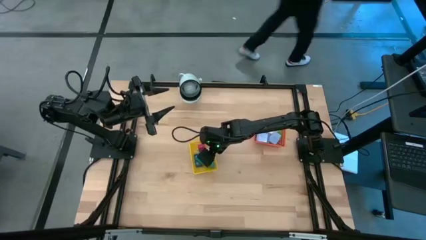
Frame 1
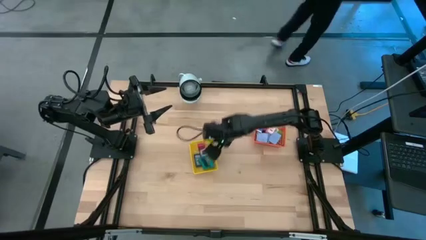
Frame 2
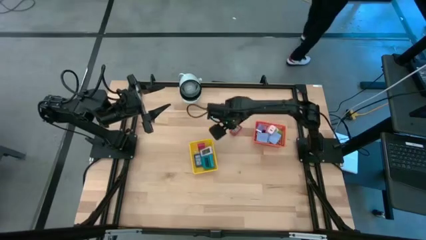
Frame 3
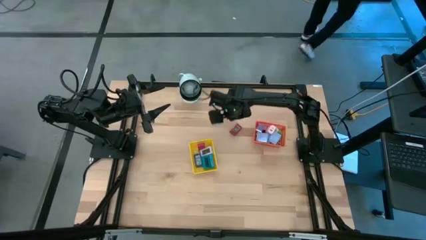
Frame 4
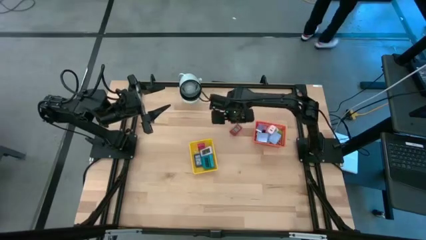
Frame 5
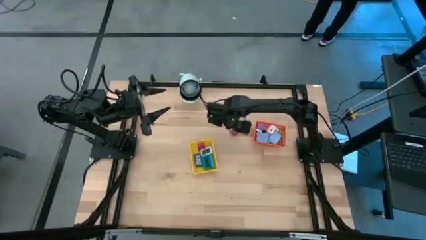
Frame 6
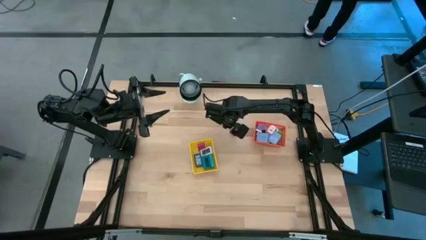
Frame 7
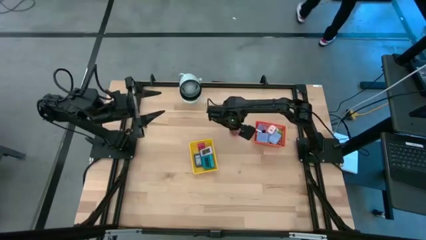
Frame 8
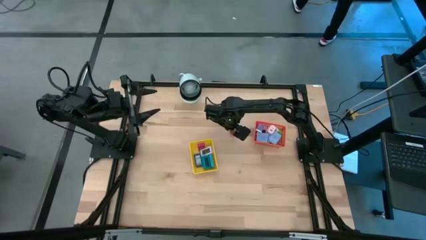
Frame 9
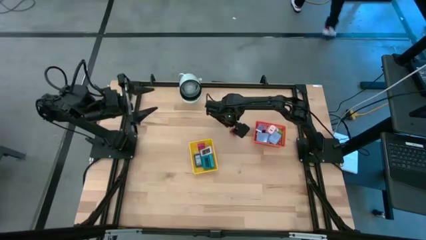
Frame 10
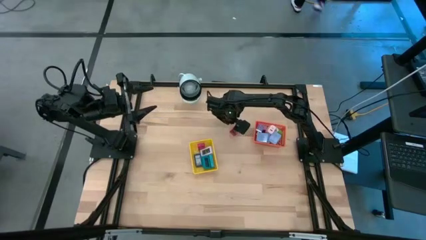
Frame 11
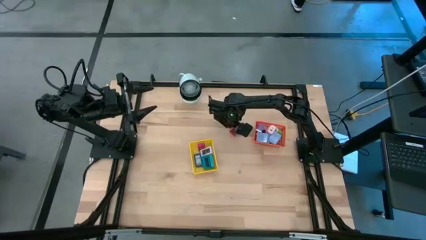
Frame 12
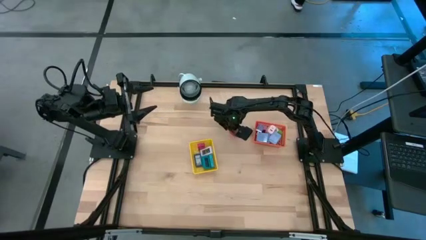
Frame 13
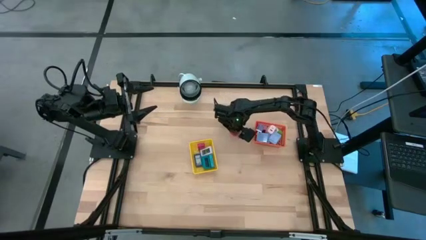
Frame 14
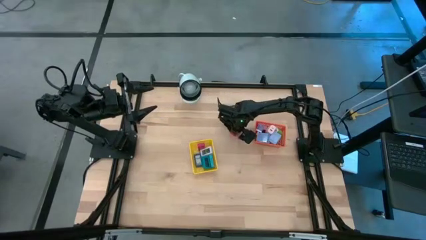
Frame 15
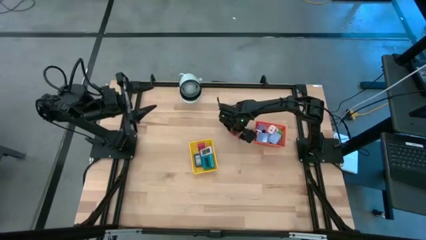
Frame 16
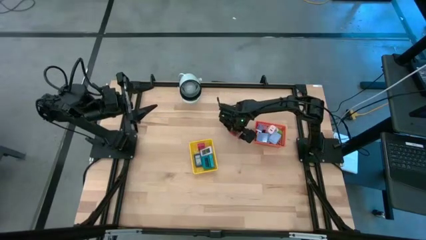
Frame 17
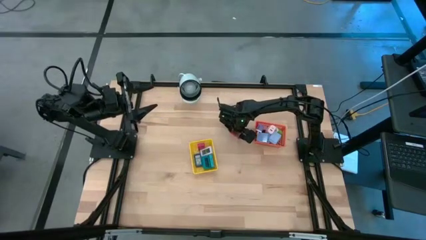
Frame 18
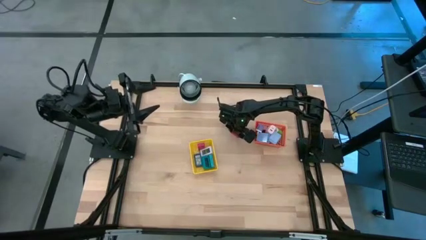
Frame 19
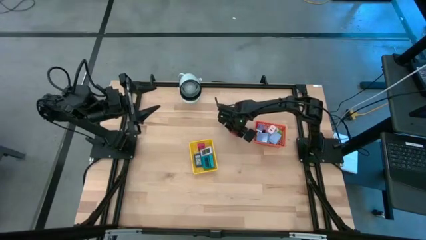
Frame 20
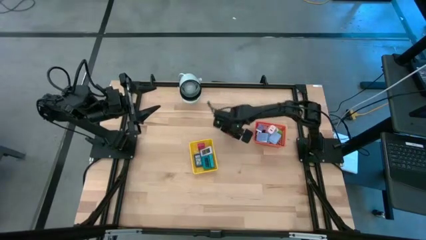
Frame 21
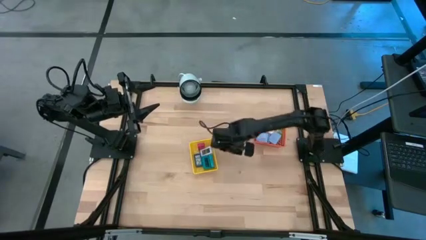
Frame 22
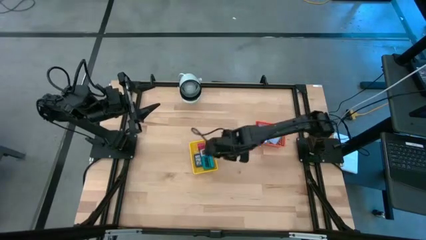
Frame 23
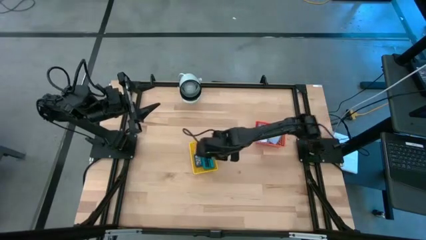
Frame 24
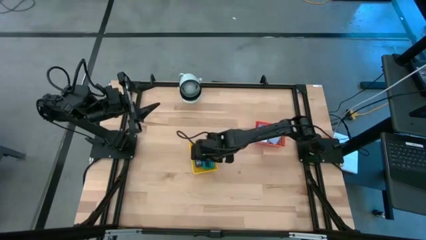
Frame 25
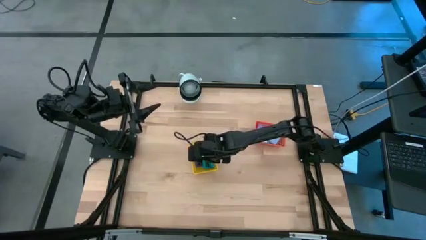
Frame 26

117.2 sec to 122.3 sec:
Task: Pick & Place Office items
Put the red digital clock into the yellow basket

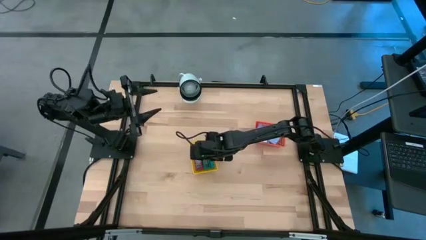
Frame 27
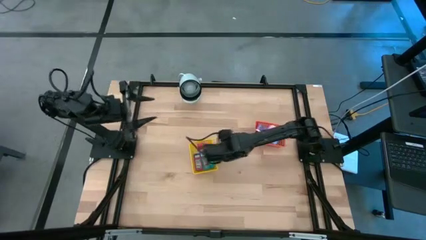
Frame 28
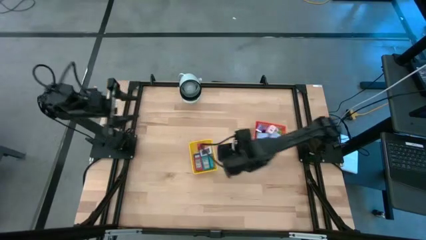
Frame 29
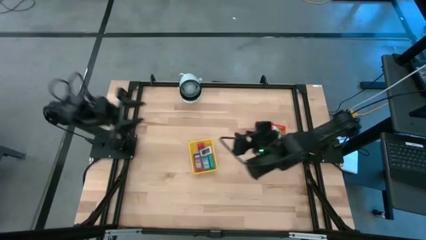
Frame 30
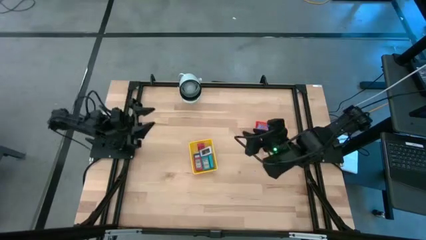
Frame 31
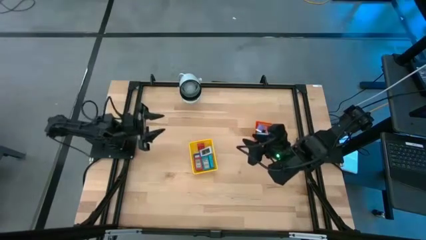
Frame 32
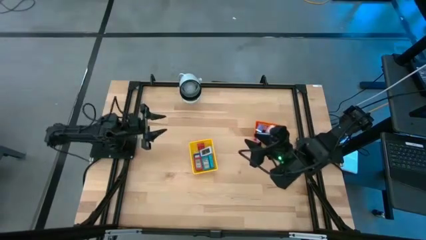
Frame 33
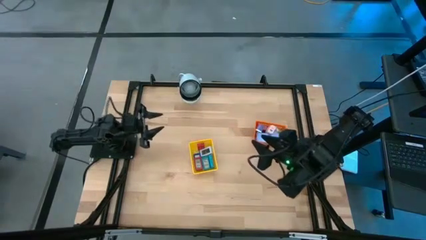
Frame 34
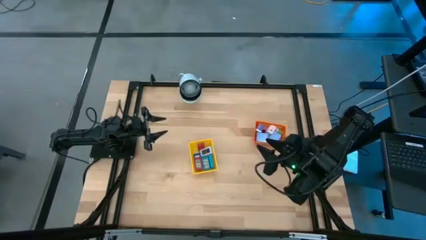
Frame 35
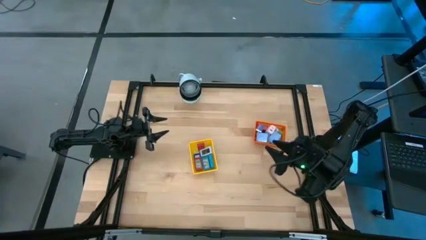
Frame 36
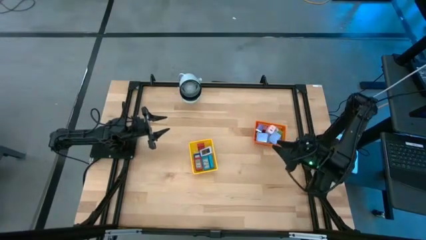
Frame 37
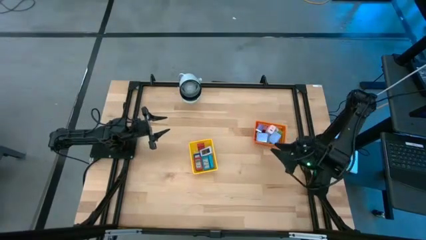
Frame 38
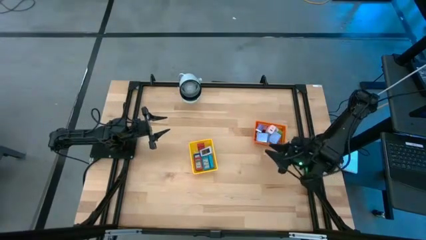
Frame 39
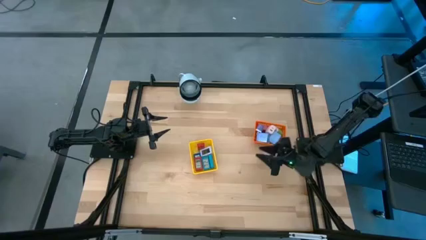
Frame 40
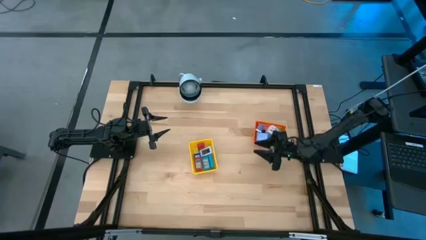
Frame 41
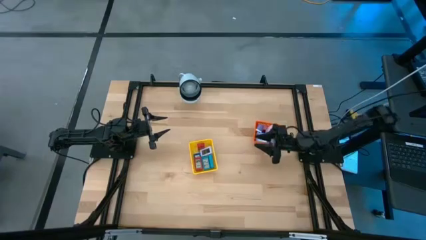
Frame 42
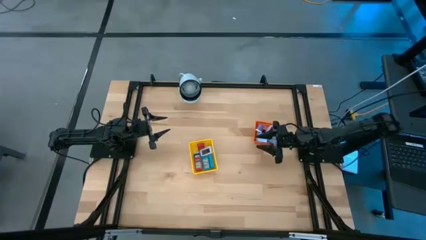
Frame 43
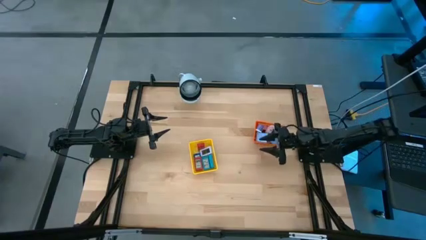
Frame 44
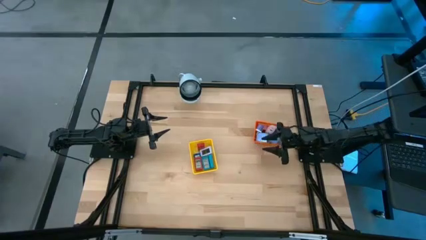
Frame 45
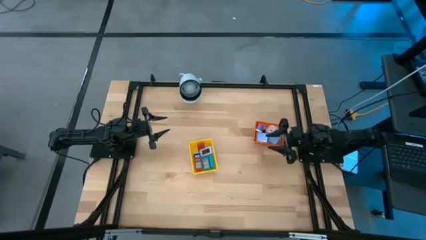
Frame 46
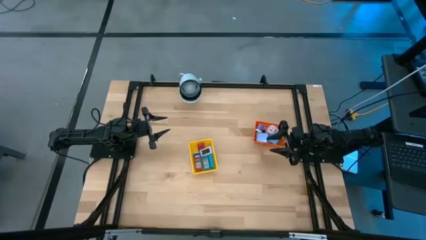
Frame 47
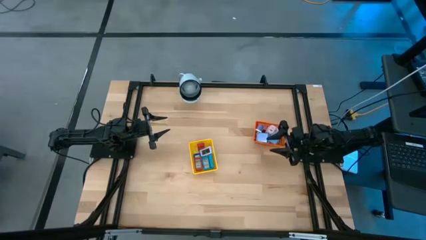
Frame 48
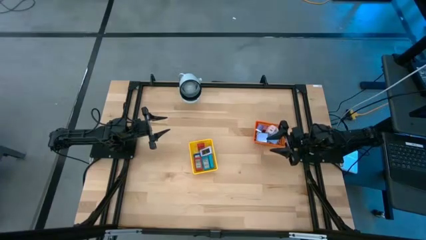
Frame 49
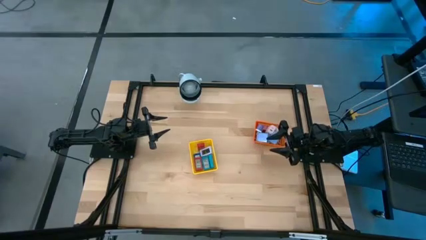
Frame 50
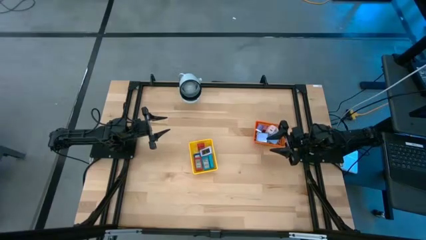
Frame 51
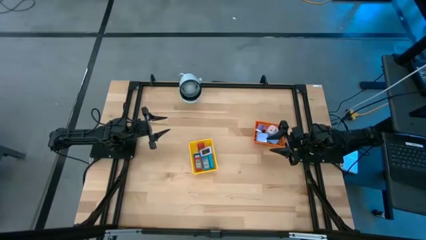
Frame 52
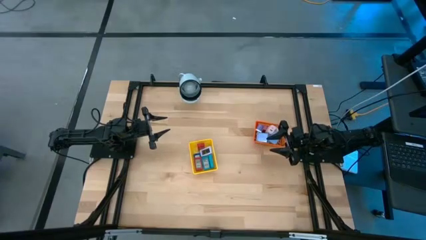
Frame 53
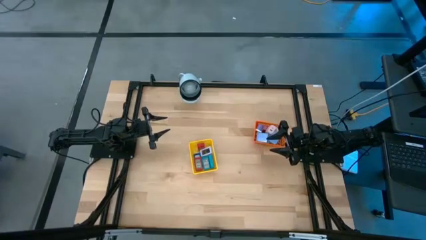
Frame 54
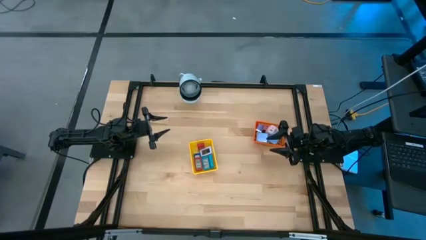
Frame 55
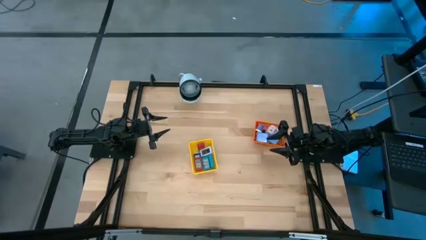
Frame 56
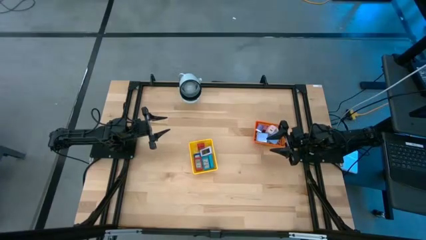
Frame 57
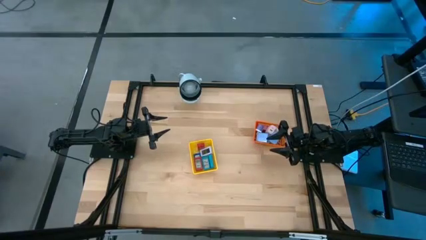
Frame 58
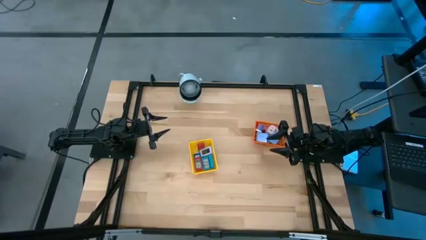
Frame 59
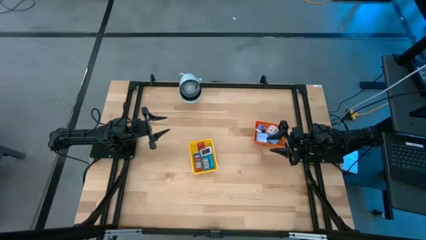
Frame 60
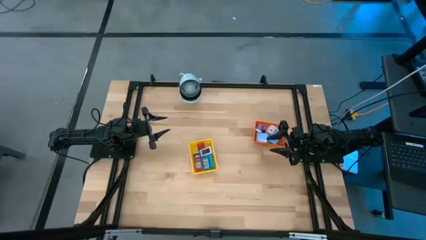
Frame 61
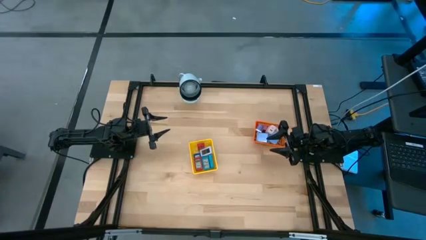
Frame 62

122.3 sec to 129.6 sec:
Return to Home Position

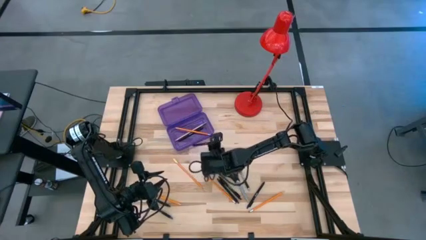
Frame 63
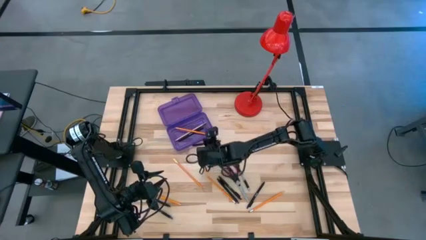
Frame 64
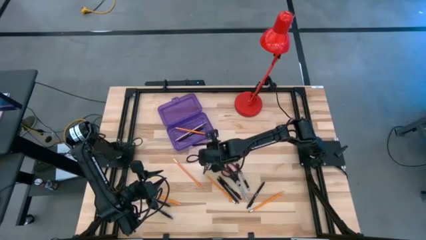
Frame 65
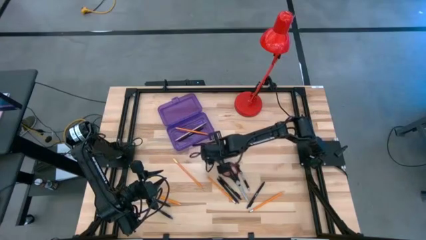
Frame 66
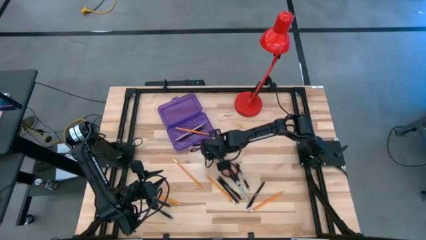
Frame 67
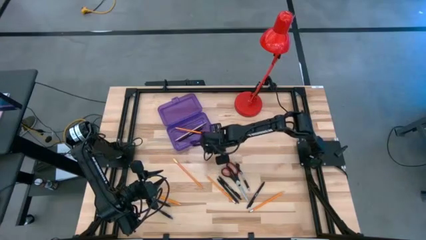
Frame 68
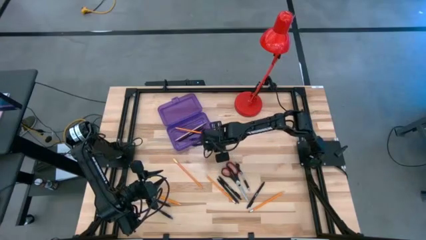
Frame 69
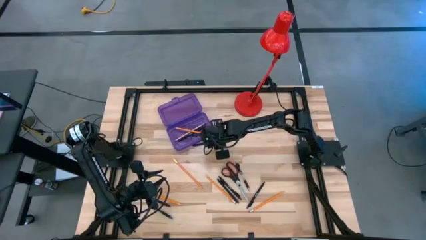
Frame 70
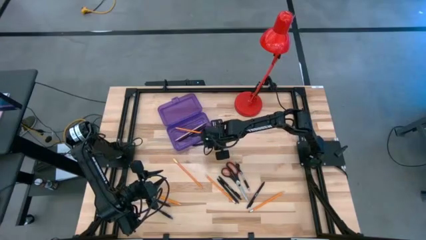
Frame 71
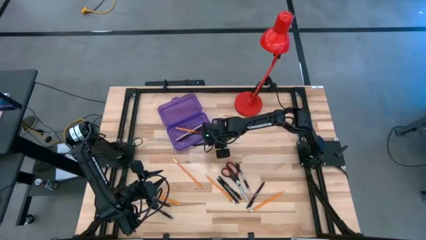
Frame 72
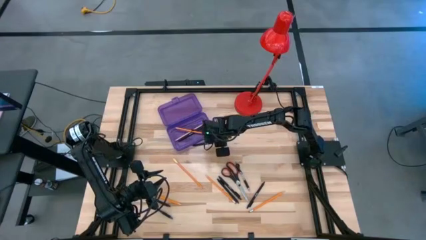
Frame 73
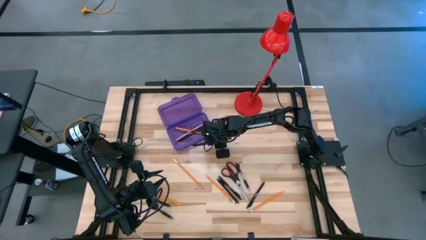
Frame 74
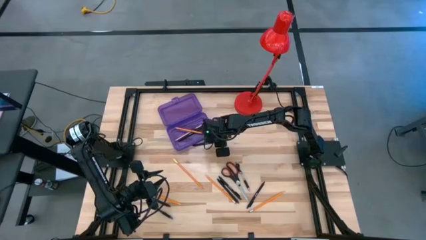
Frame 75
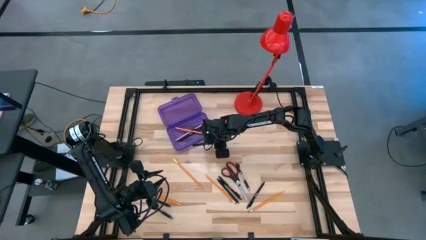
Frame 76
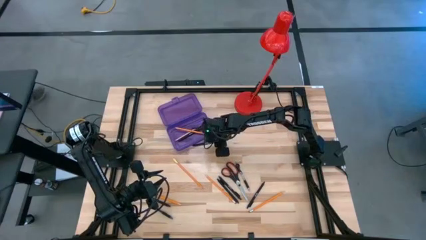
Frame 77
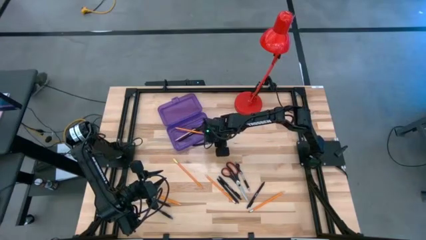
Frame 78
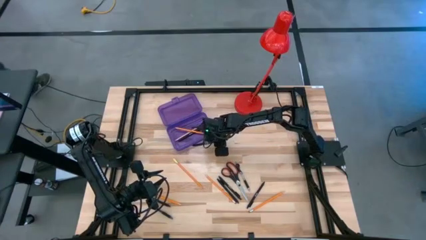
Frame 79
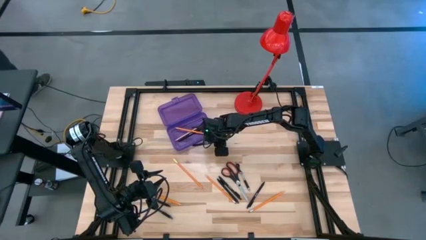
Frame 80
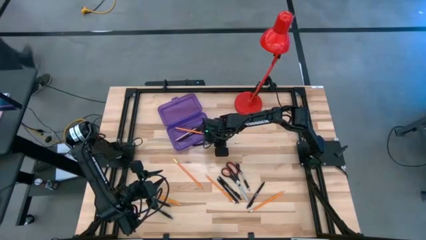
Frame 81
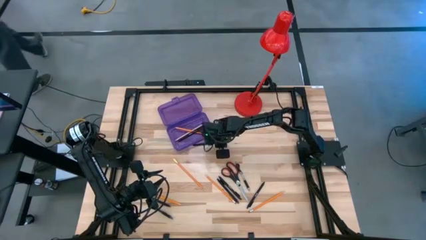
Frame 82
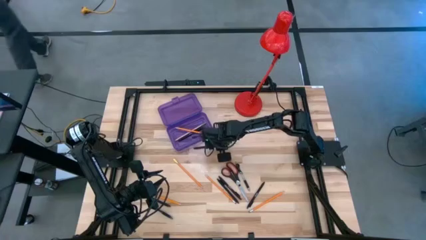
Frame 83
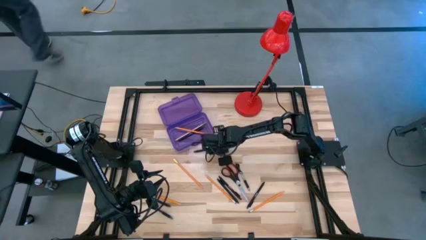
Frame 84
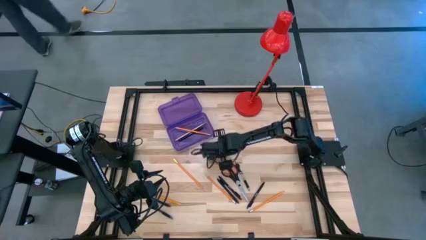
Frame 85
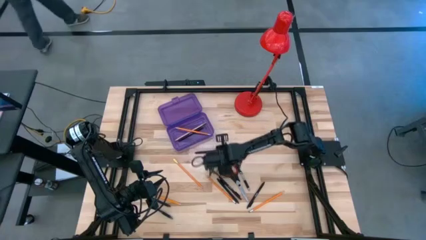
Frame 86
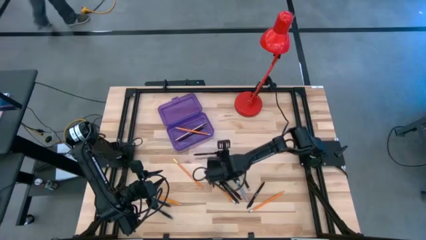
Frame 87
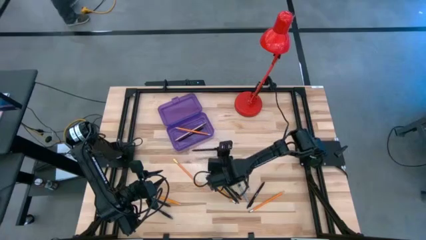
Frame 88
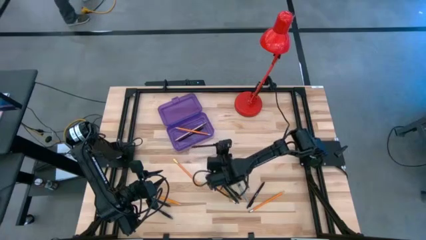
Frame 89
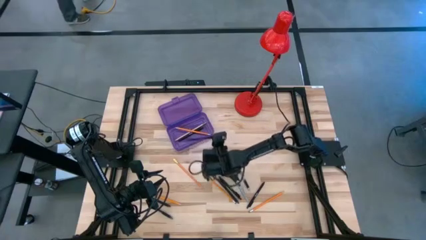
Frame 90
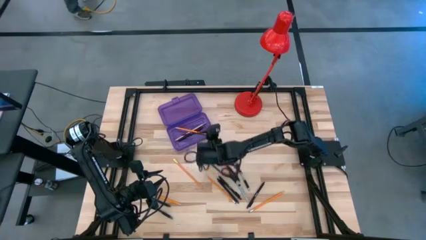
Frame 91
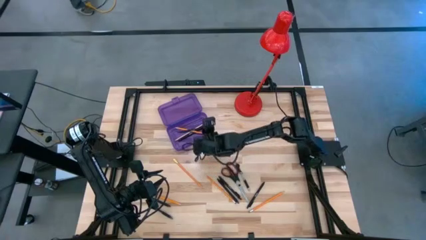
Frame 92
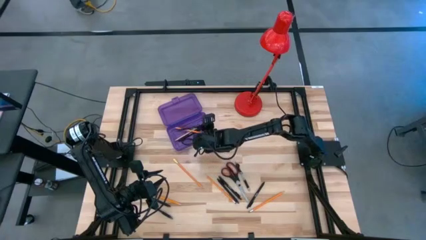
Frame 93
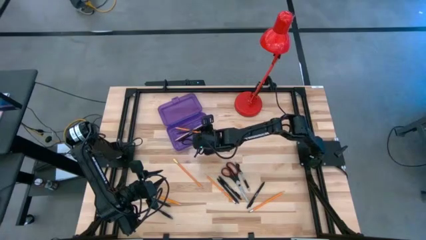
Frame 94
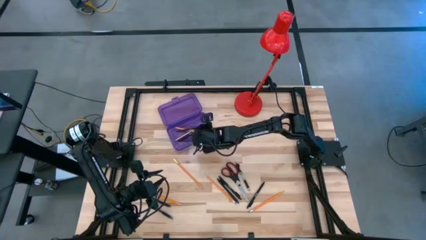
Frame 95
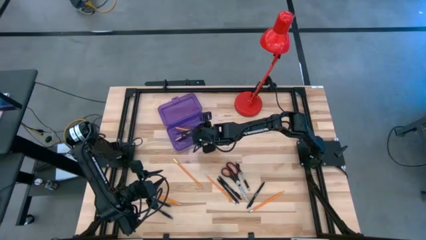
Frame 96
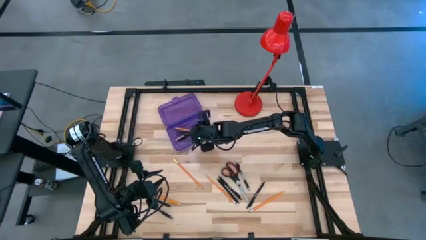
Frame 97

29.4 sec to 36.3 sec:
Task: Pick & place school supplies into a supply box
Put the black pen into the purple supply box
